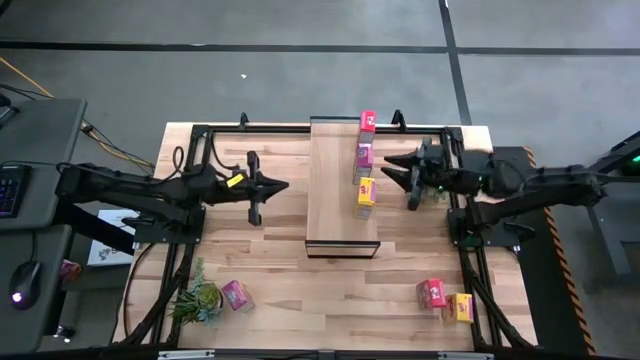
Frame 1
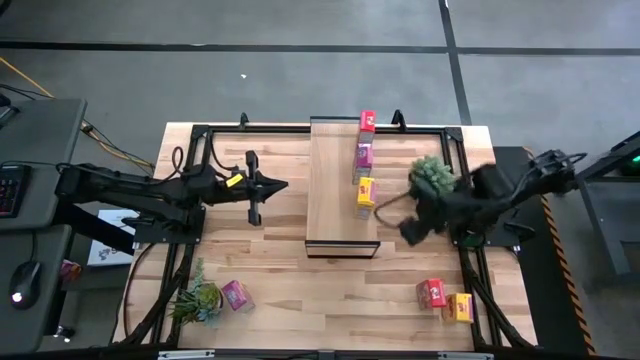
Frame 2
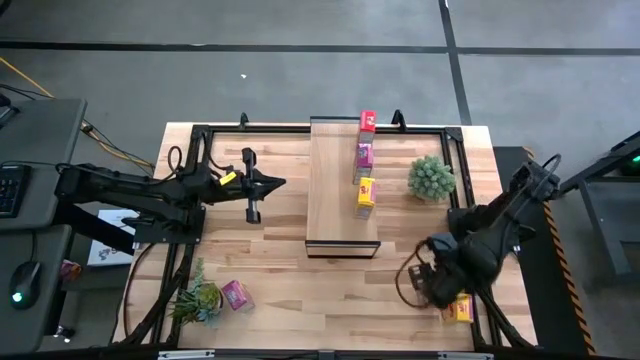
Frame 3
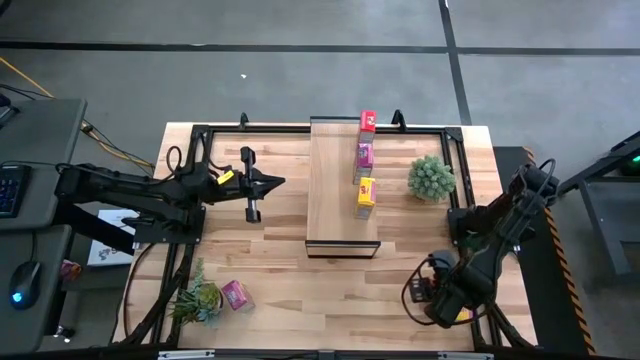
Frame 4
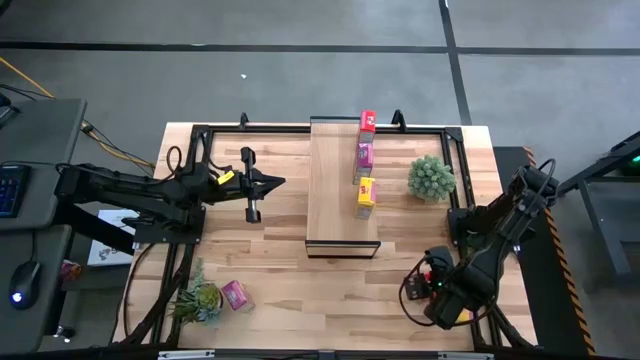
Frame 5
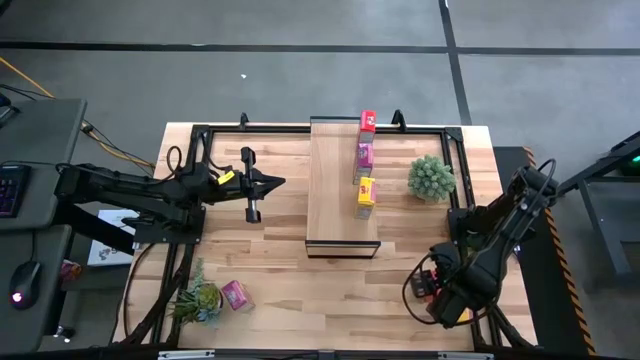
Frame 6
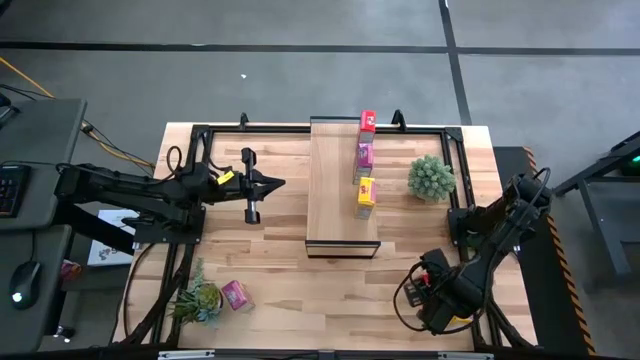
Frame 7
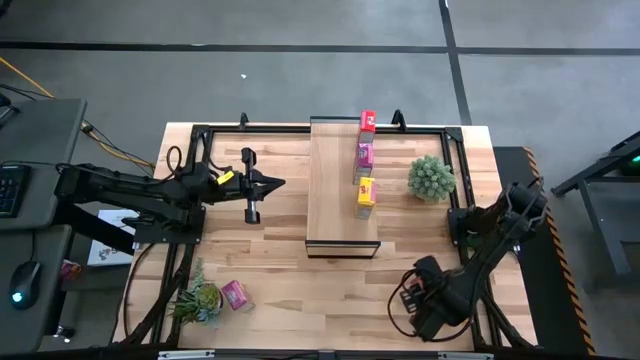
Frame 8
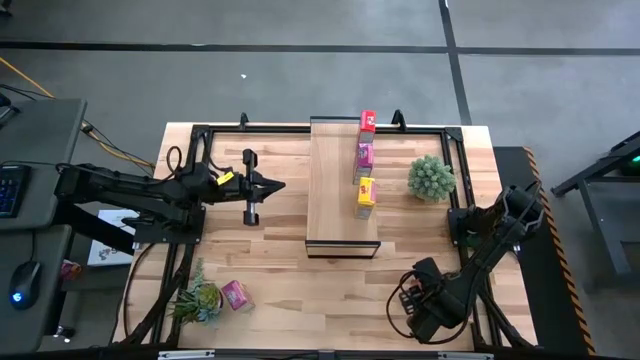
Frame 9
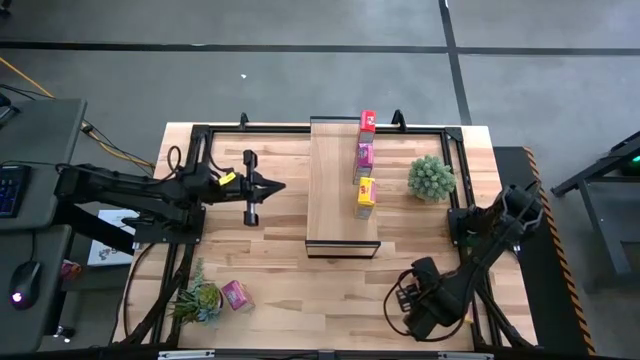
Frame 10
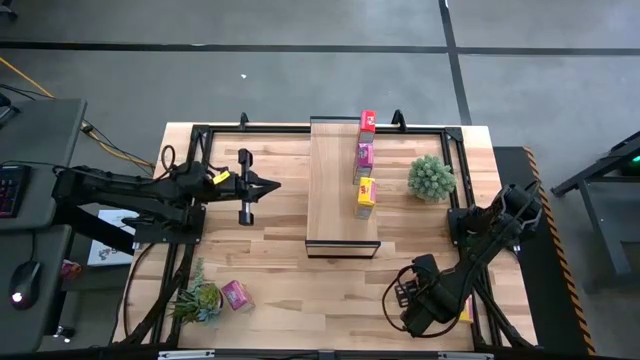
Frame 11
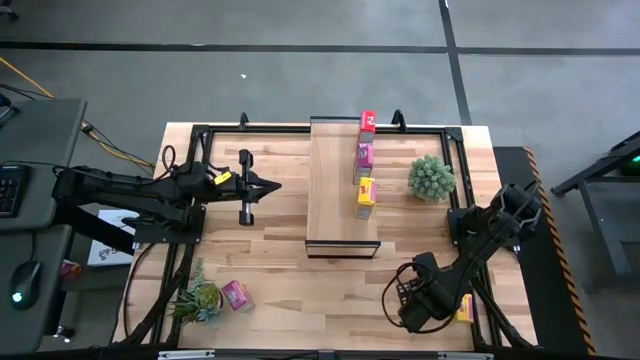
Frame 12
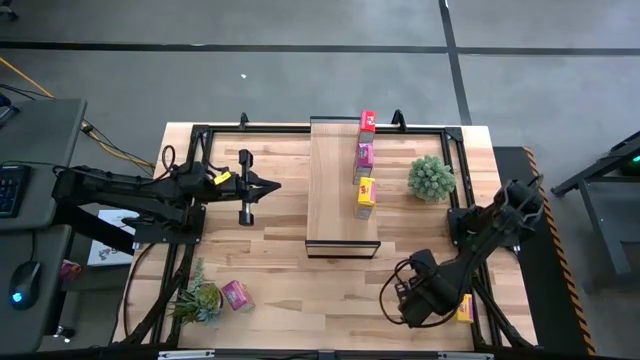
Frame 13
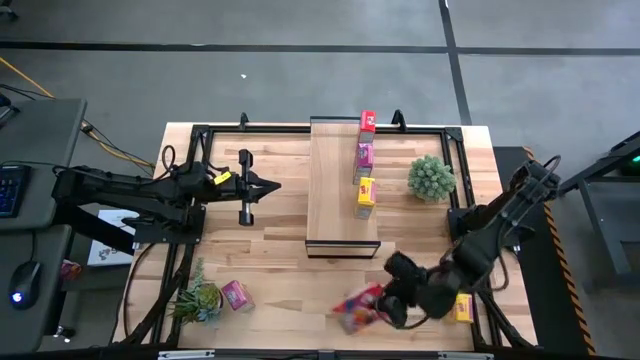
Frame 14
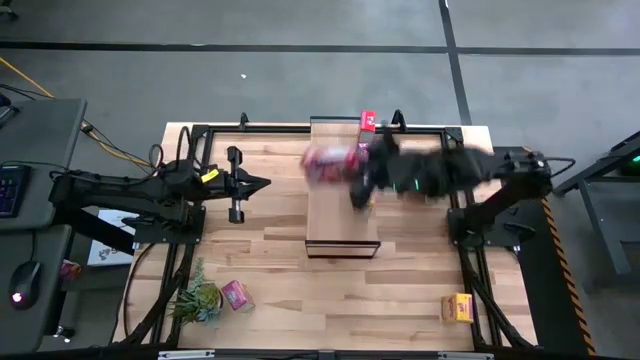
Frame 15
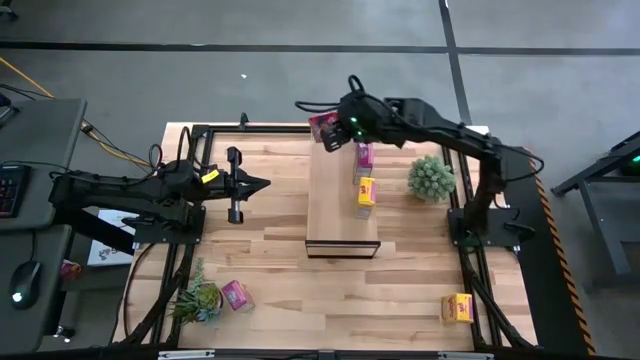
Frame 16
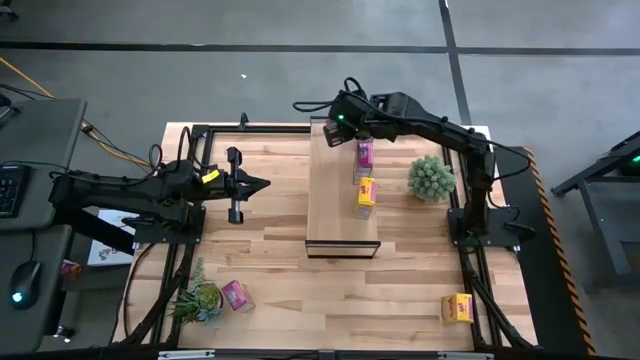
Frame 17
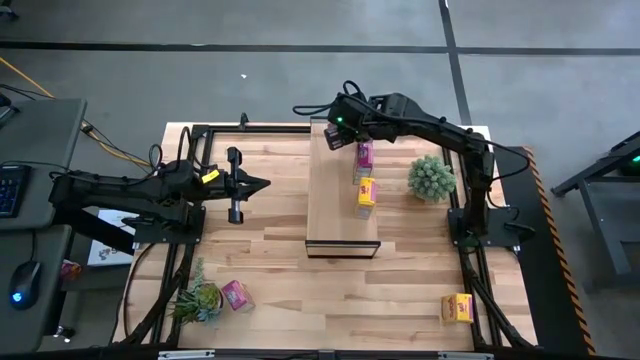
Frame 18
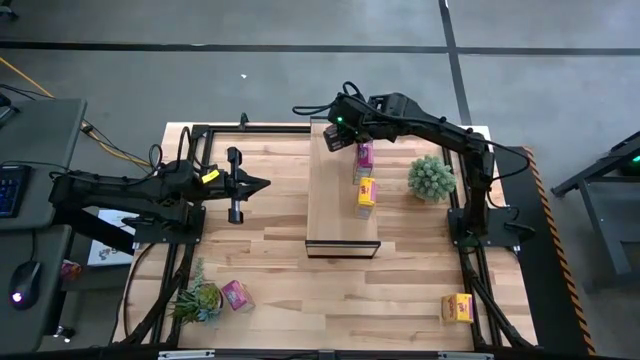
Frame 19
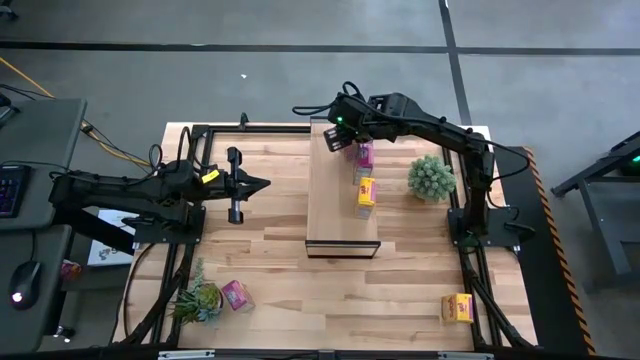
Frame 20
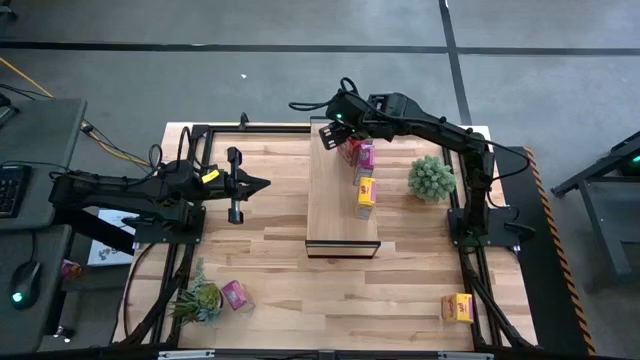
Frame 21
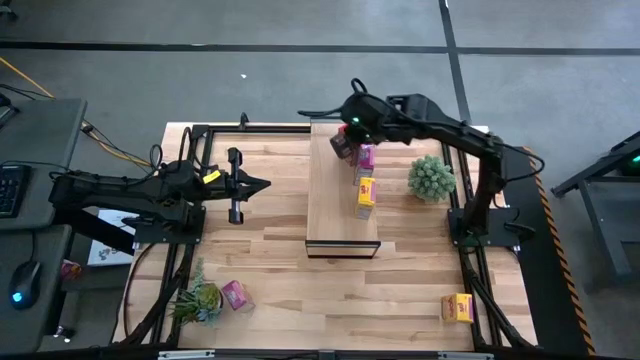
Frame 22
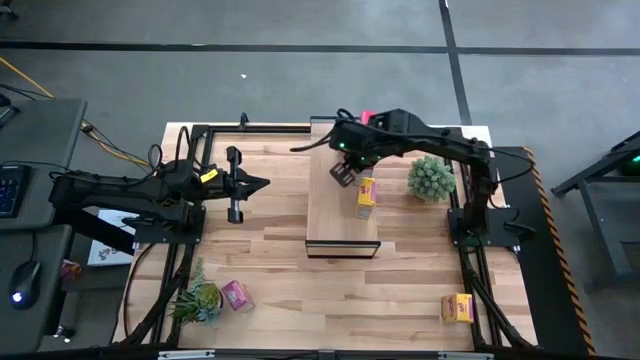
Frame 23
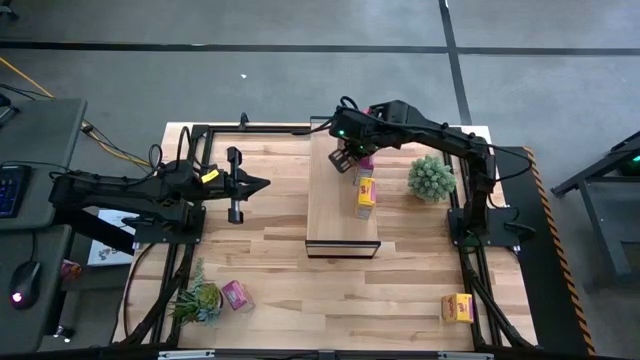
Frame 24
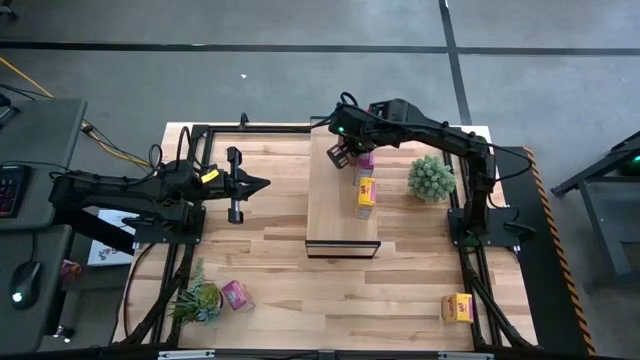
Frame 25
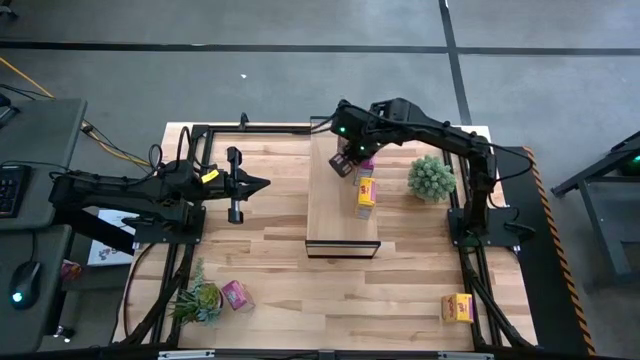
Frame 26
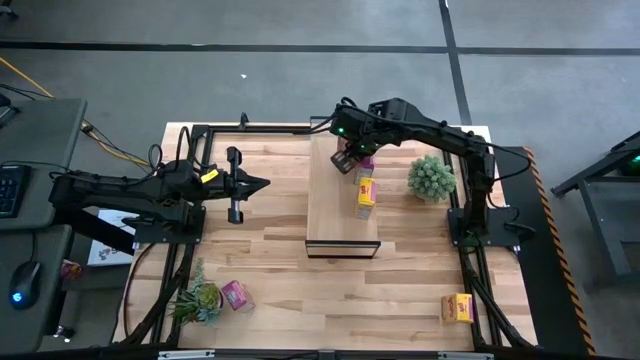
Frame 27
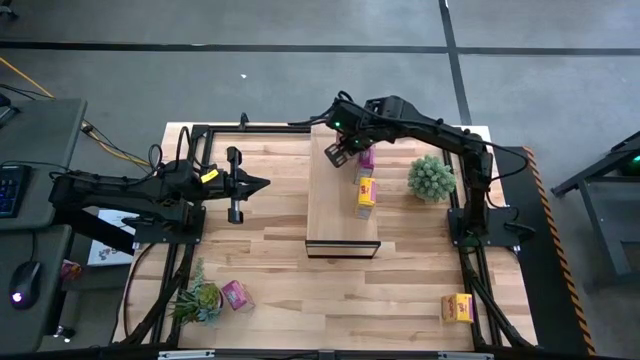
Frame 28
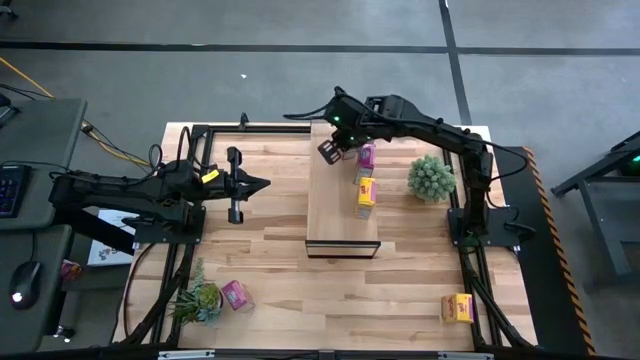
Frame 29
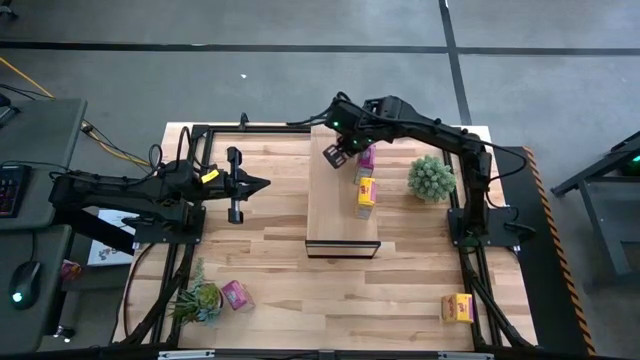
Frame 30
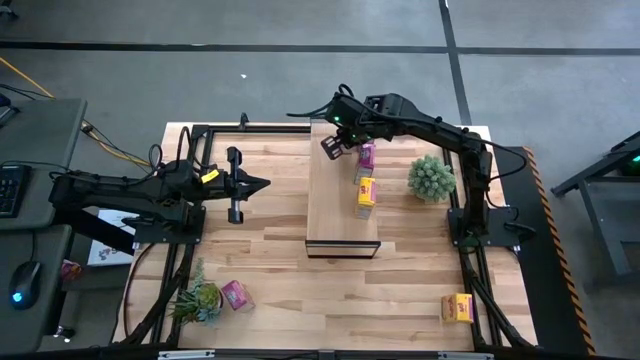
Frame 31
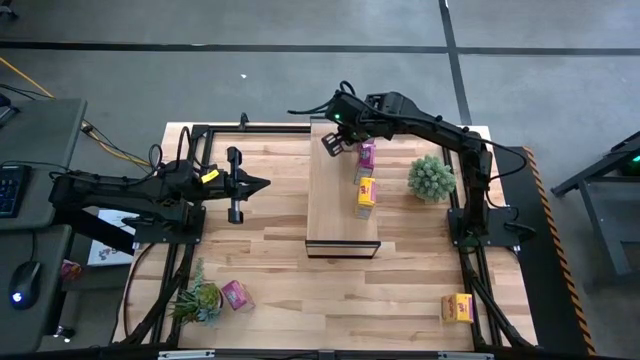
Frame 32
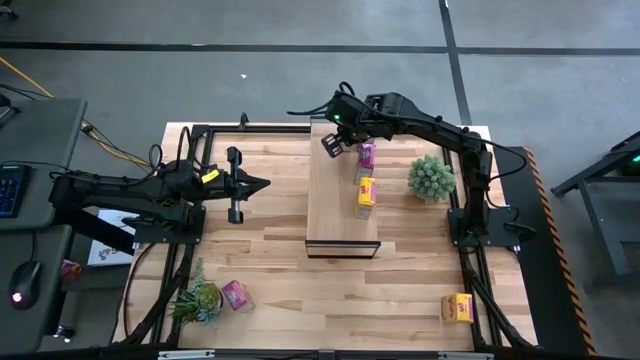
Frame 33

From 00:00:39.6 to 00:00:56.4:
Task: Stack cereal on shelf
Put the red cereal box on the shelf aligned with the red cereal box

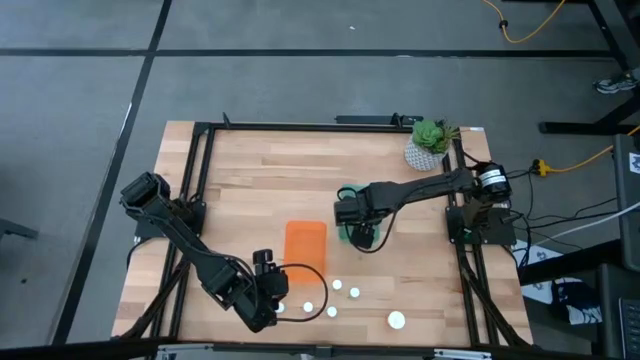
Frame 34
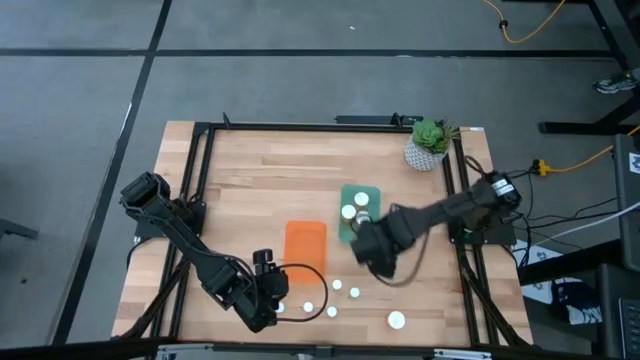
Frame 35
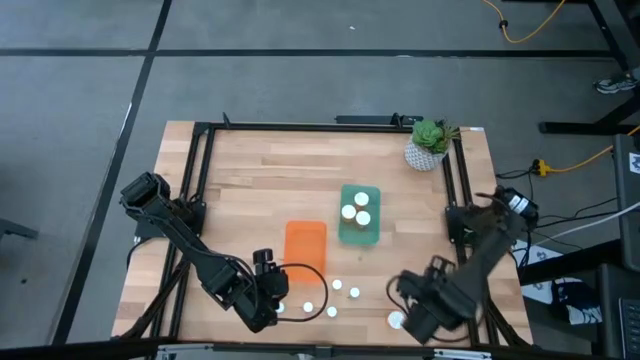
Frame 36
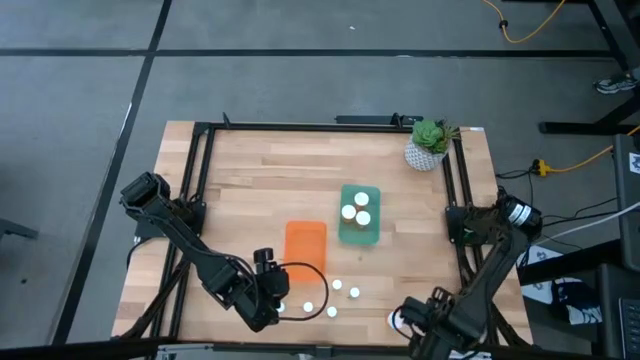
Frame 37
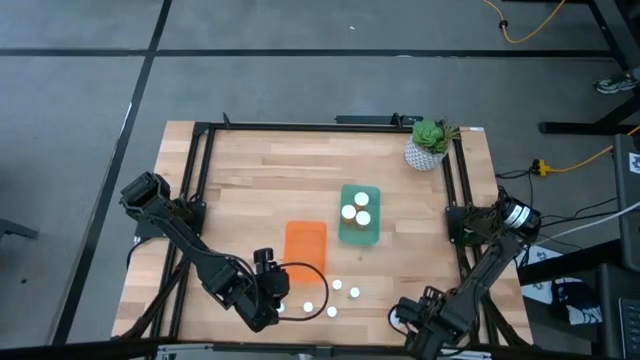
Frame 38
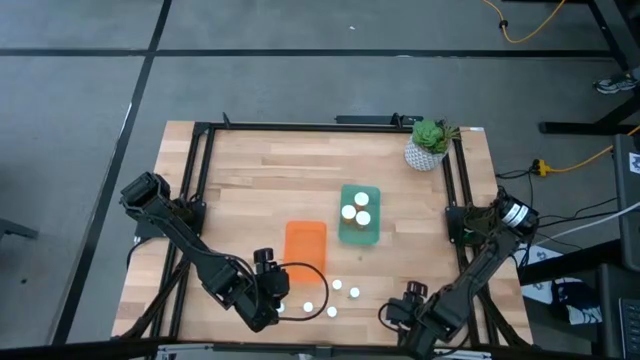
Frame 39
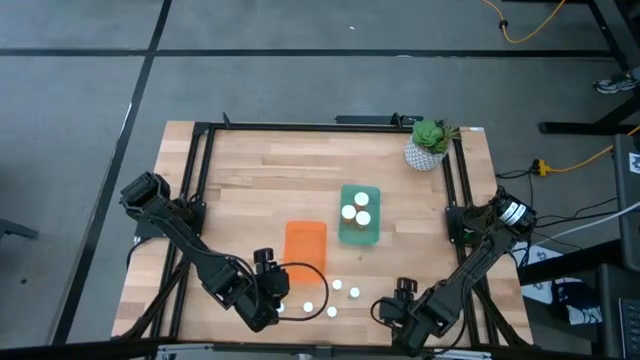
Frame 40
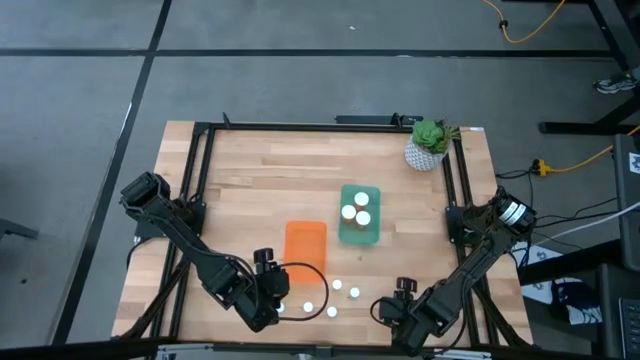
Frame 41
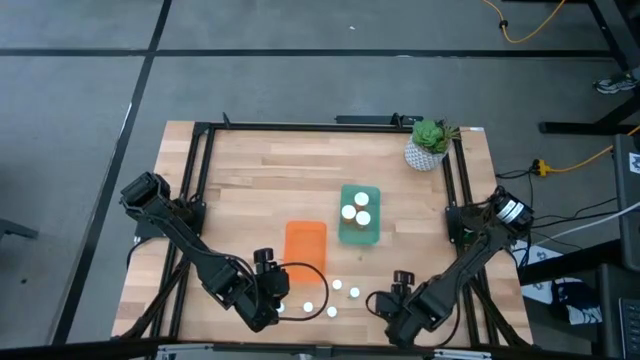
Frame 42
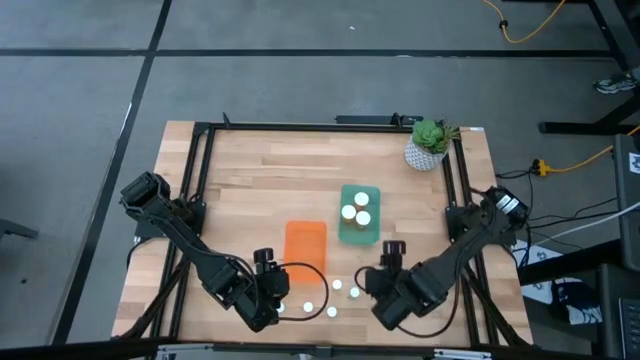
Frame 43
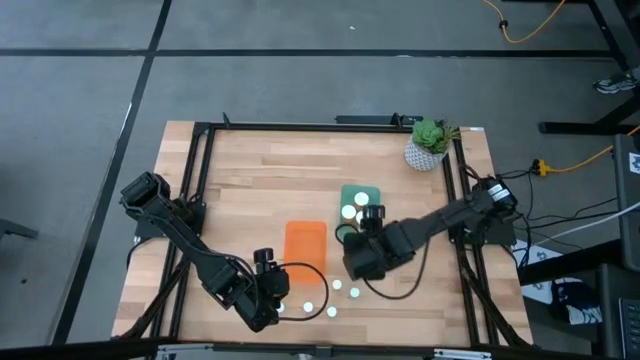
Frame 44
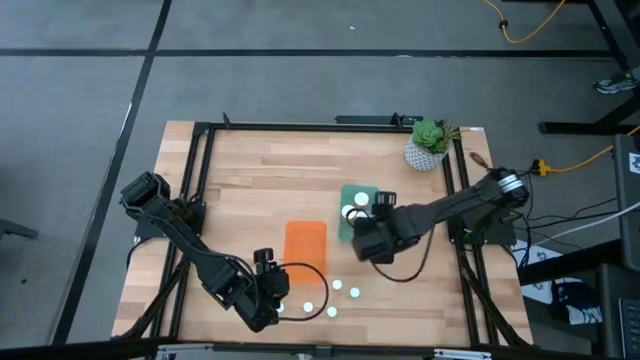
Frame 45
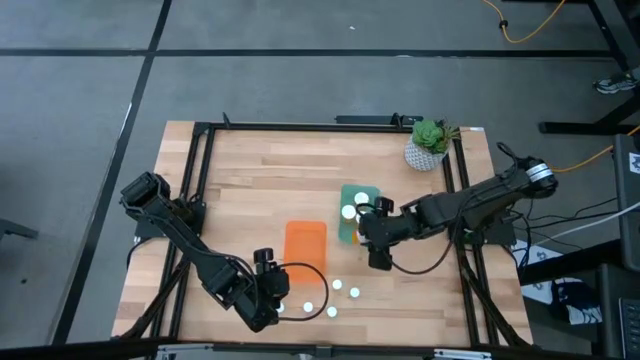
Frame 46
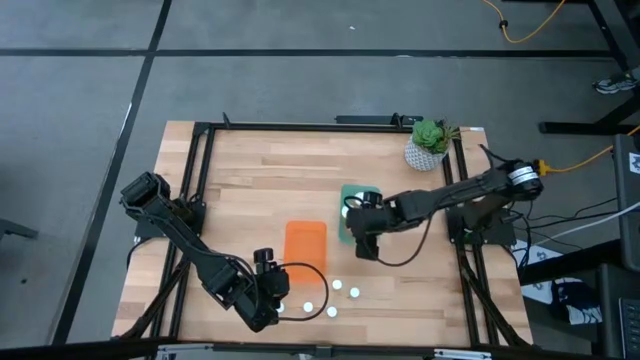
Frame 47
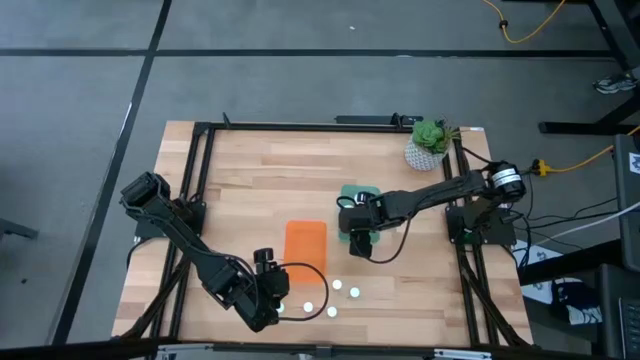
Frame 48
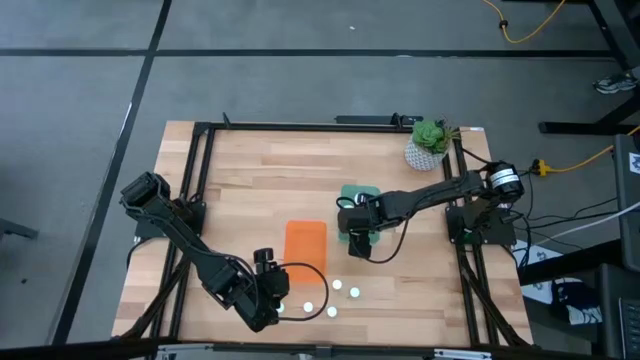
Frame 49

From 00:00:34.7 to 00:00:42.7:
Task: Pick and place medicine bottles into bin by pill shape (circle, oval)
Put the big orange capsule bottle into the green bin
